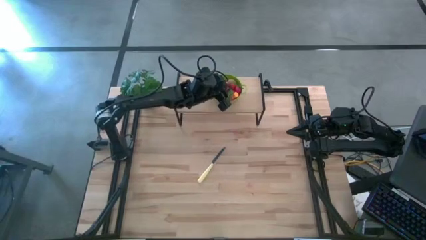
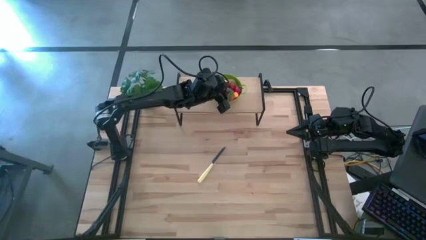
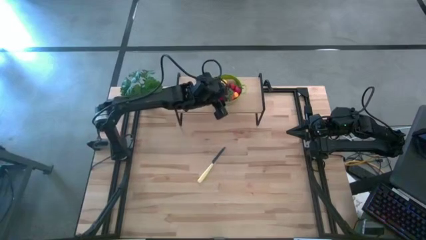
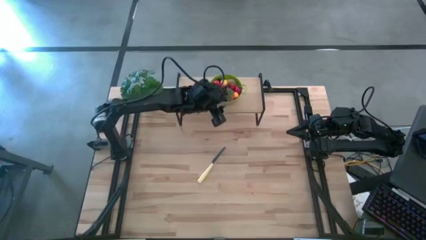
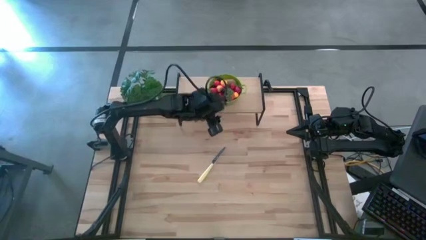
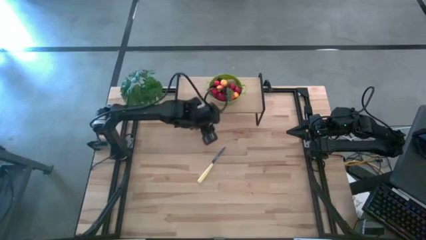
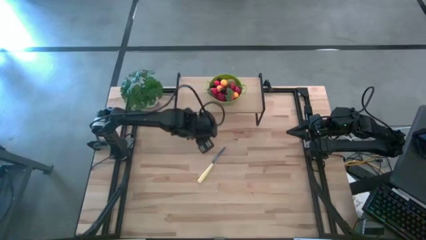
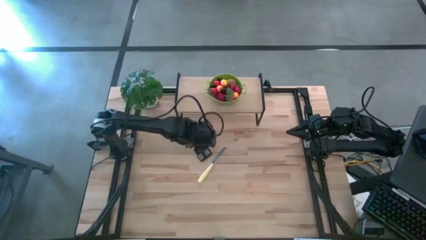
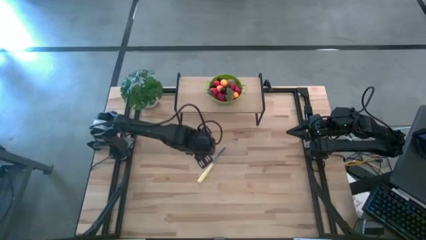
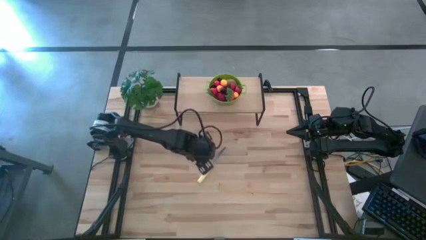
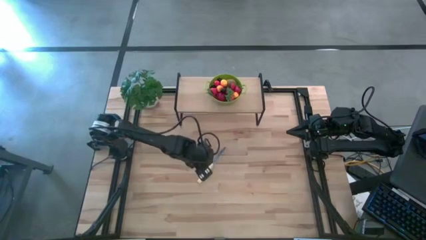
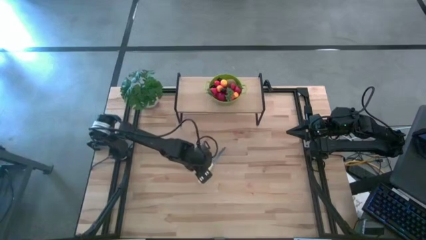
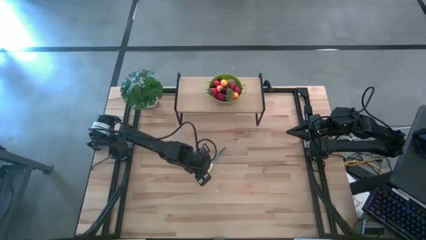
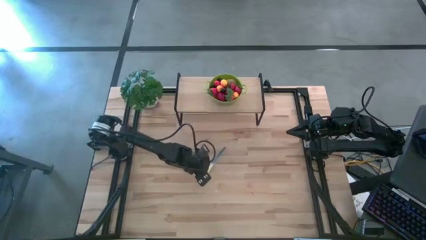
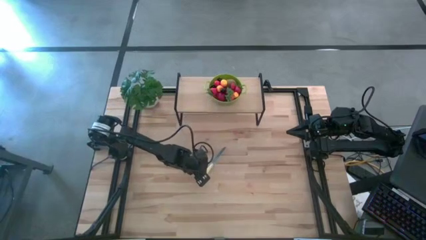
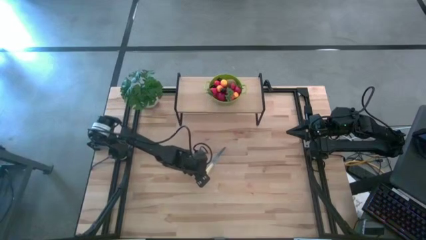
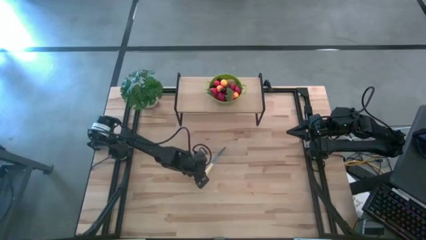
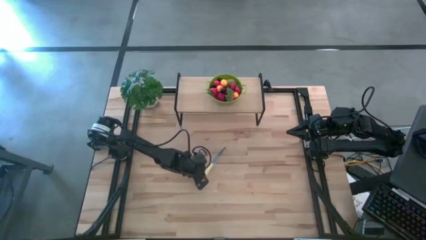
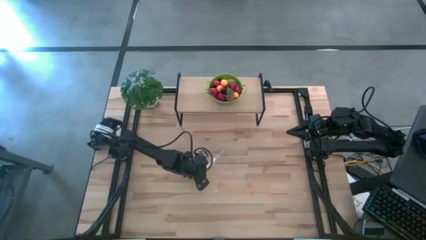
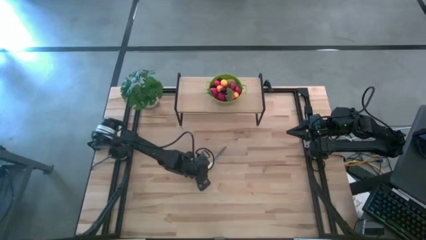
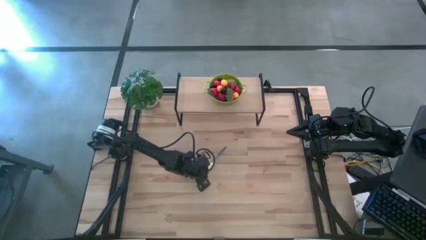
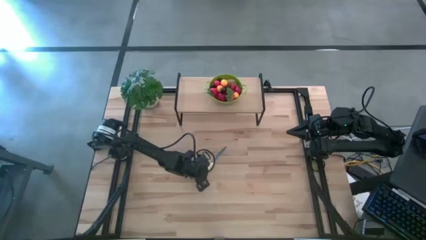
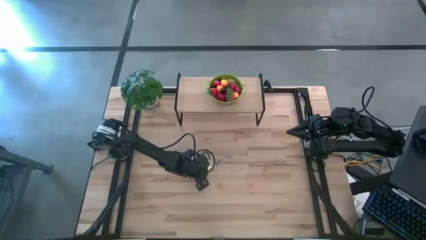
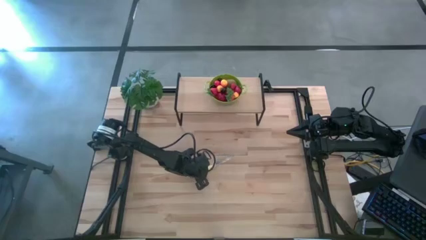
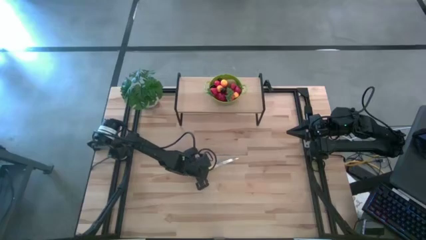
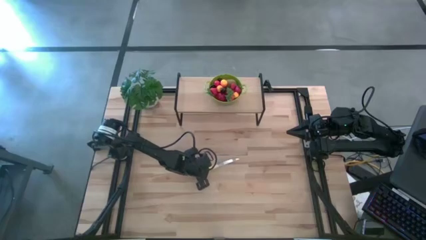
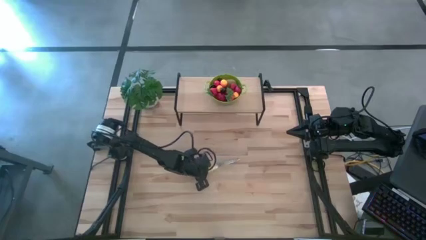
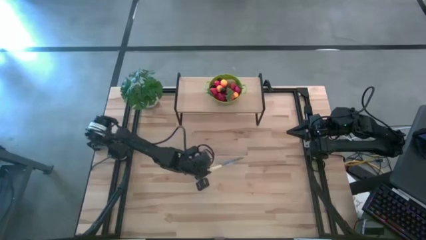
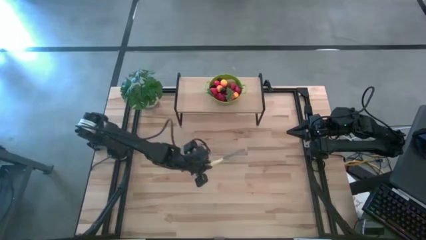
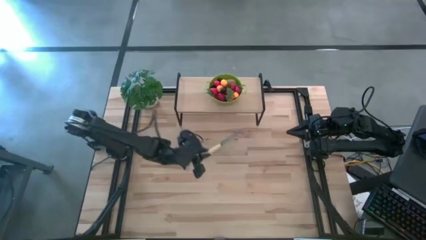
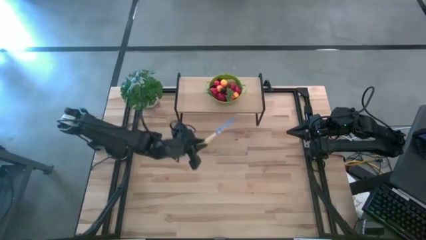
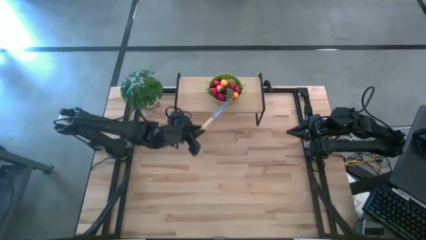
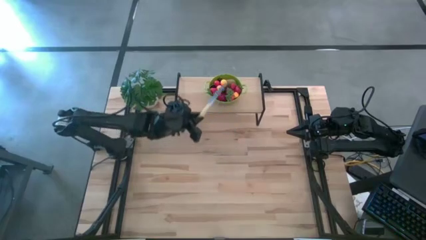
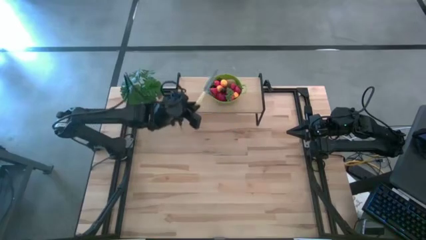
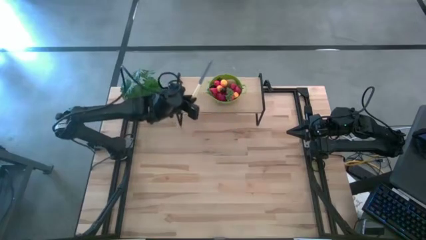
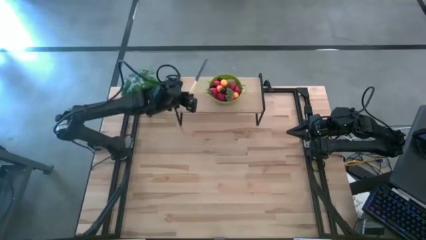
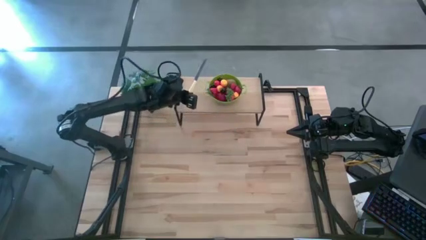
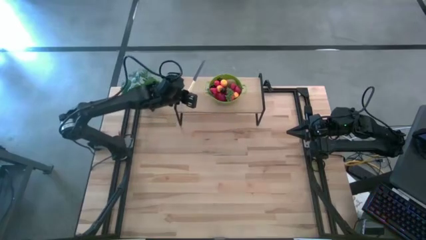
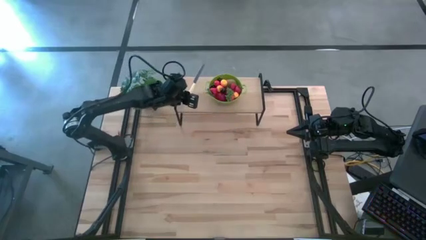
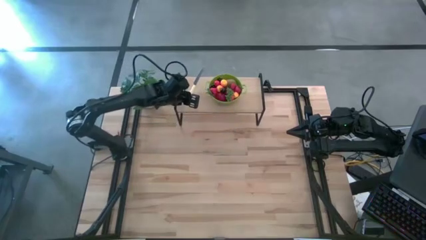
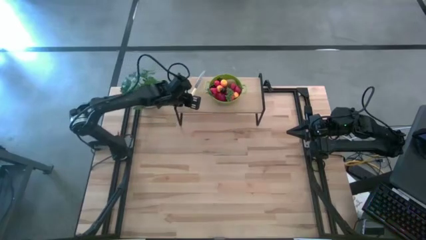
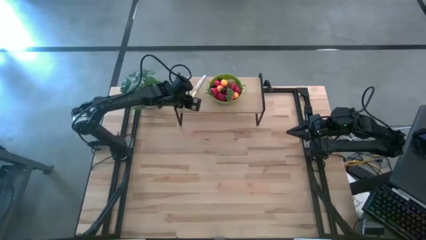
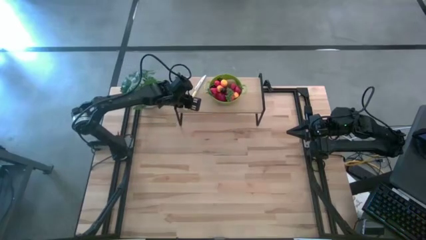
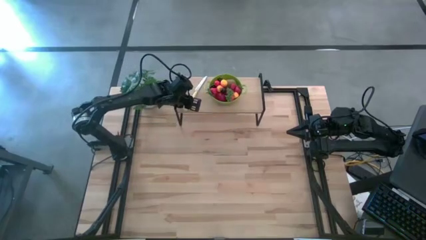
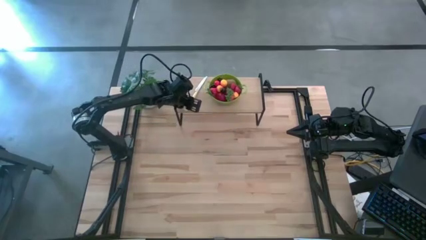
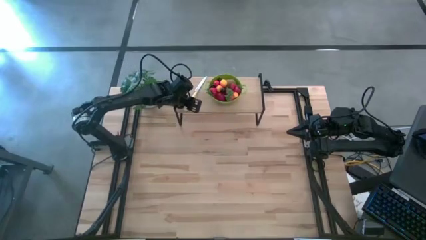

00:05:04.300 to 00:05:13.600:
Task: Pick & Place Fruit
Put the knife on the shelf

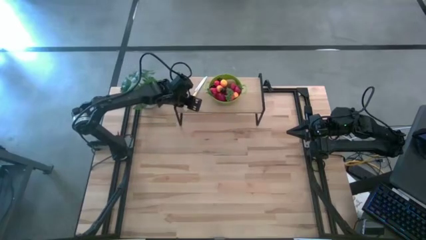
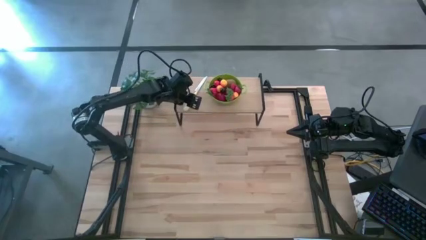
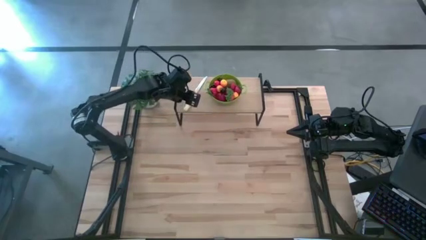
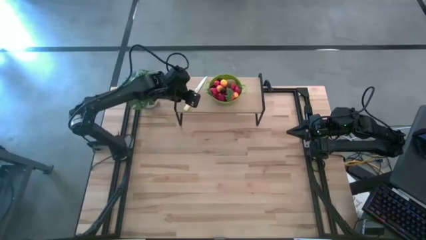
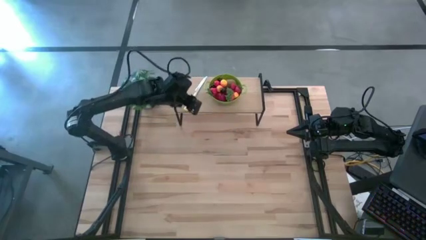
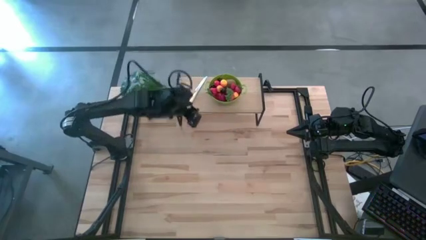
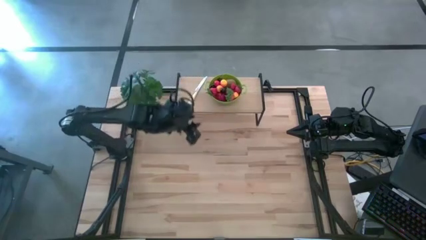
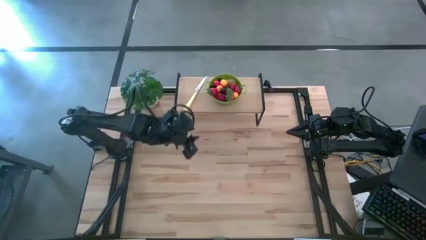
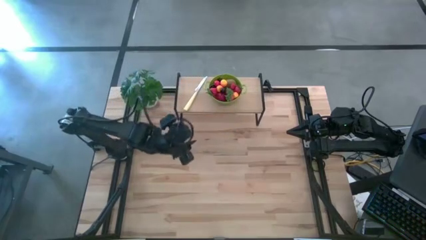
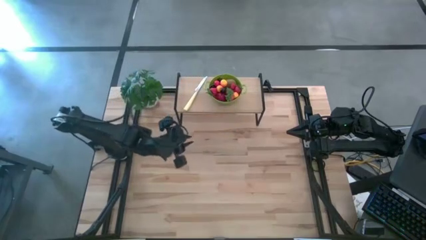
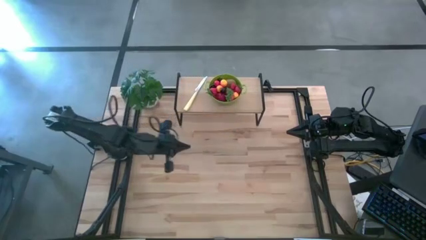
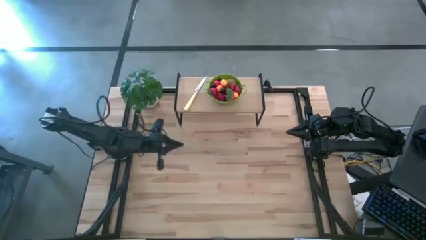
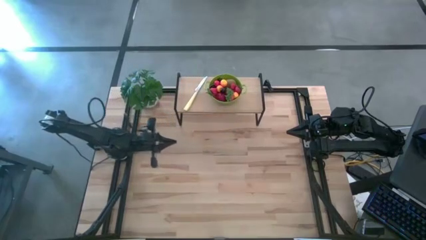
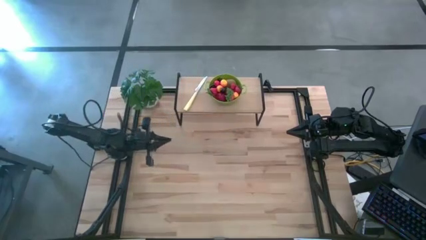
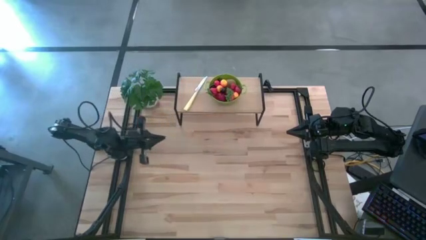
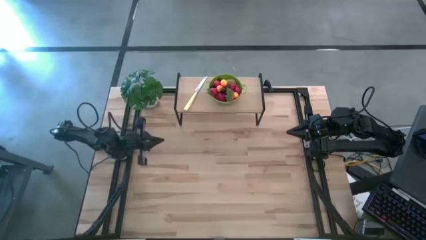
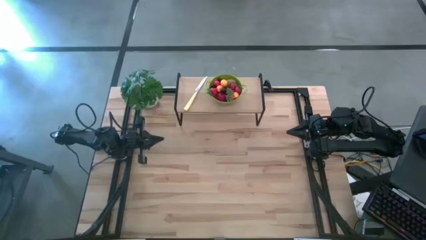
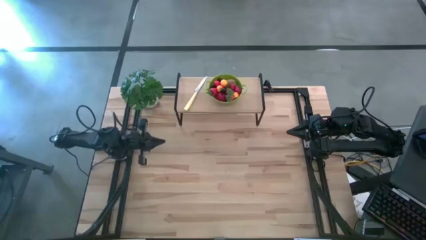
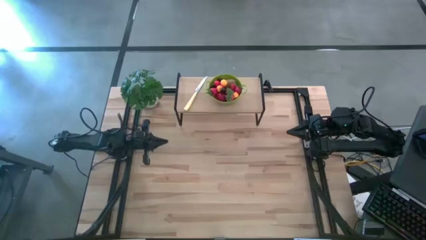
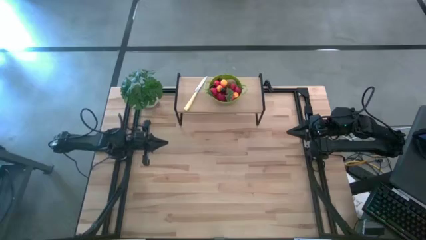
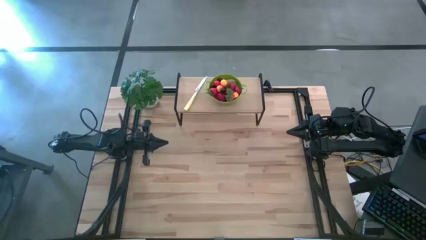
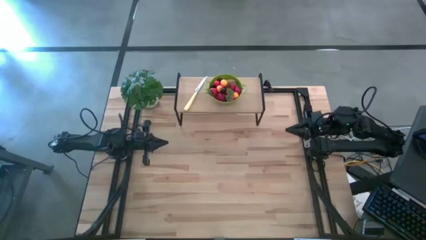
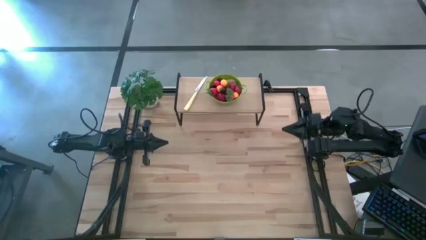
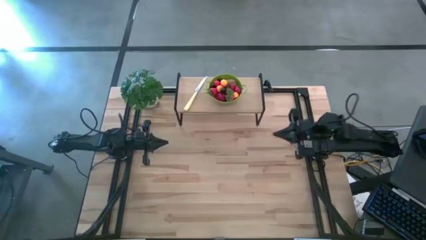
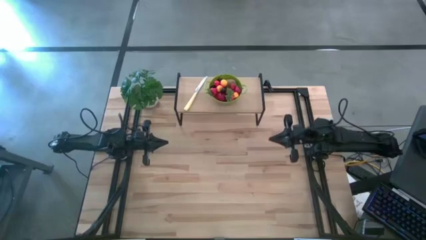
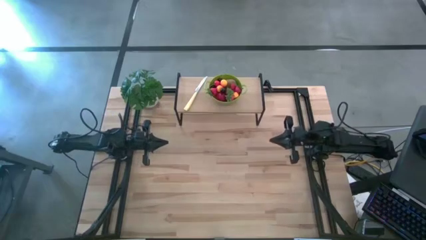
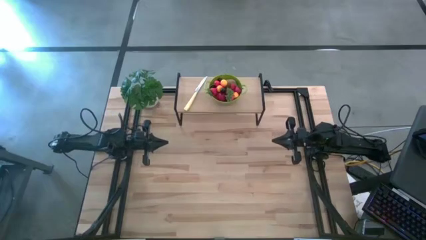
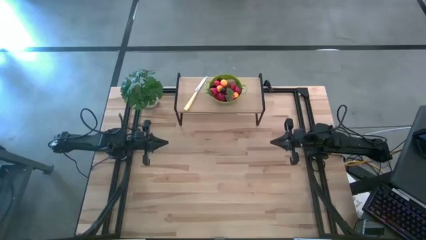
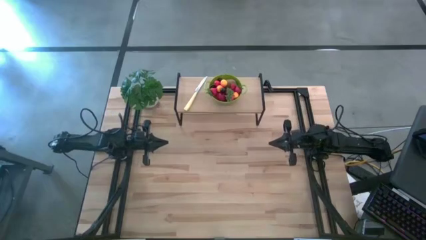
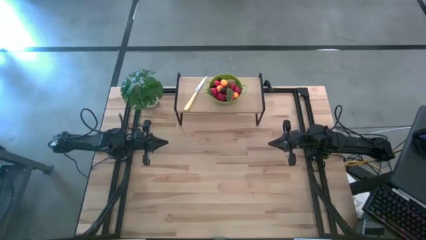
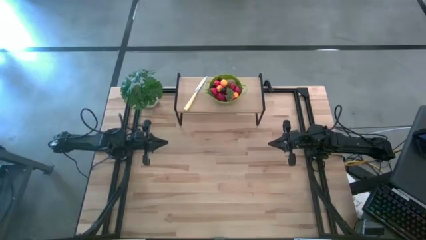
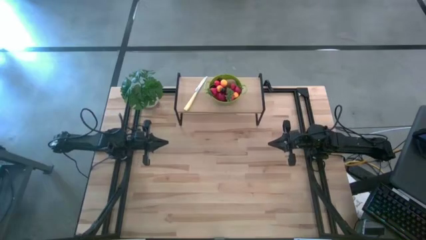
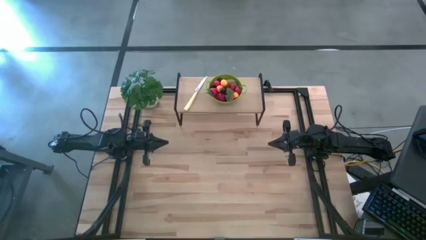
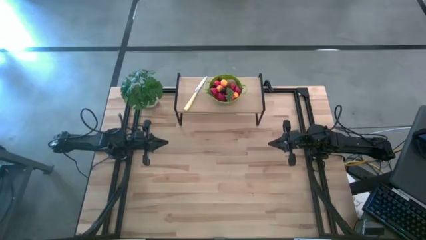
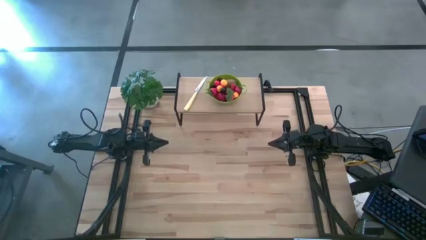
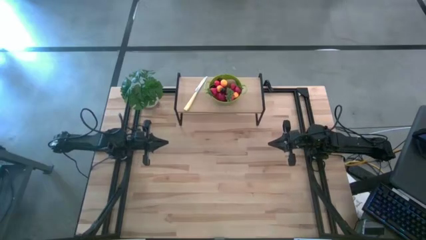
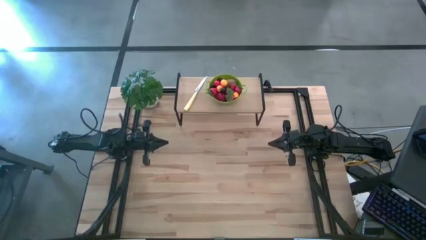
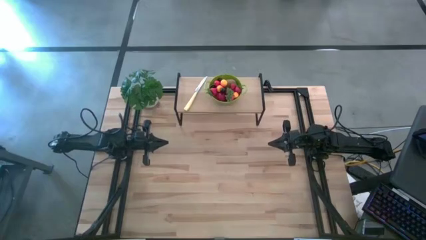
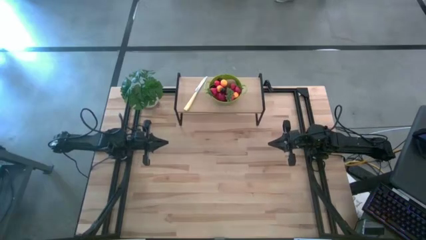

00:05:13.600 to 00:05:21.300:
Return to Home Position
